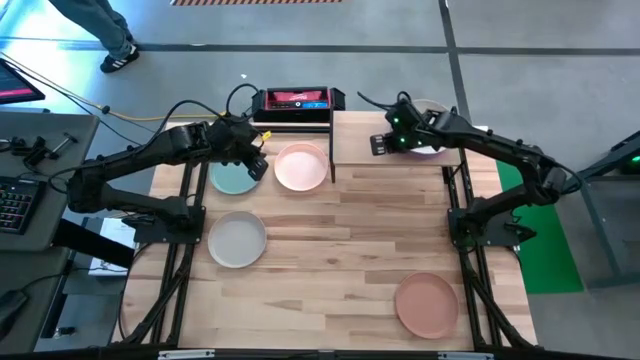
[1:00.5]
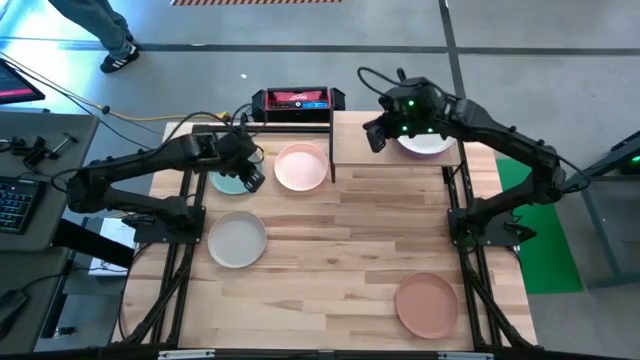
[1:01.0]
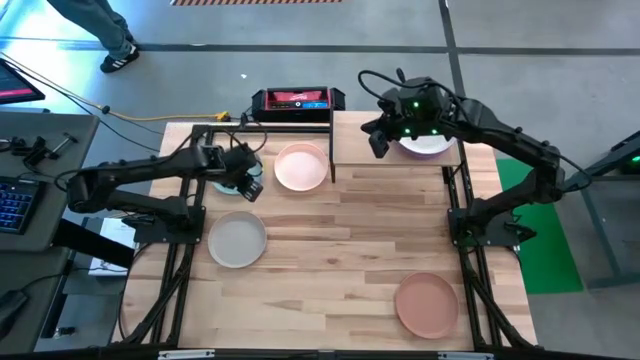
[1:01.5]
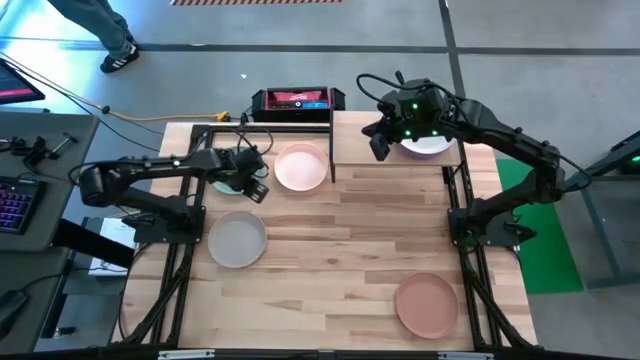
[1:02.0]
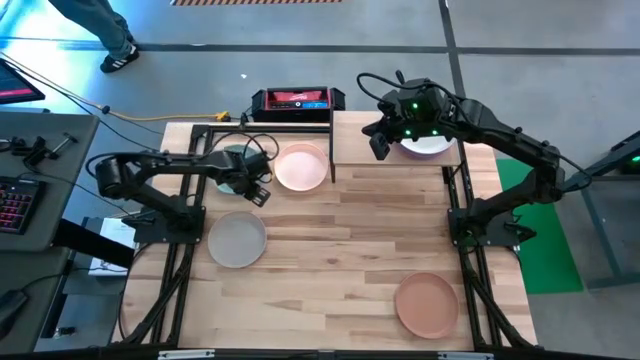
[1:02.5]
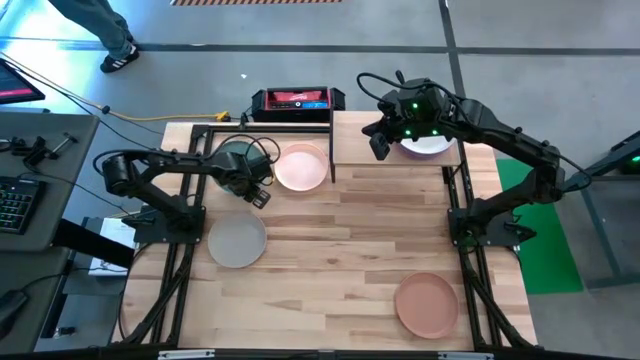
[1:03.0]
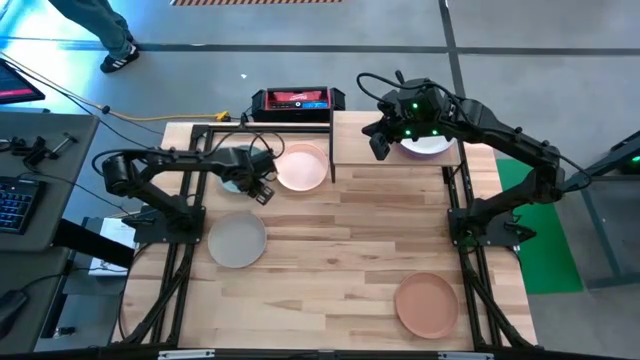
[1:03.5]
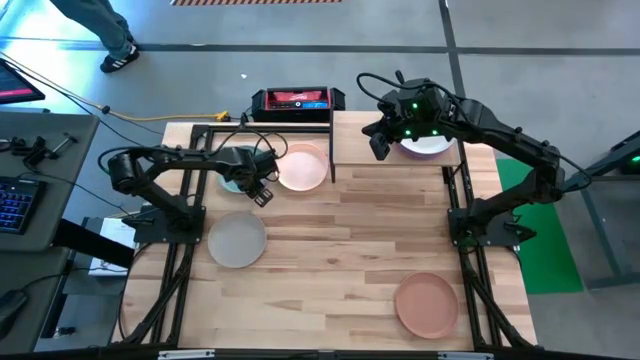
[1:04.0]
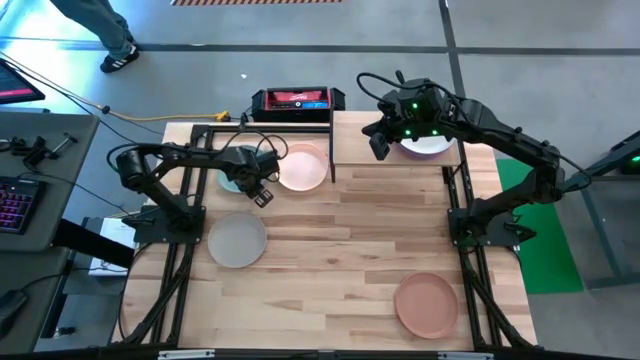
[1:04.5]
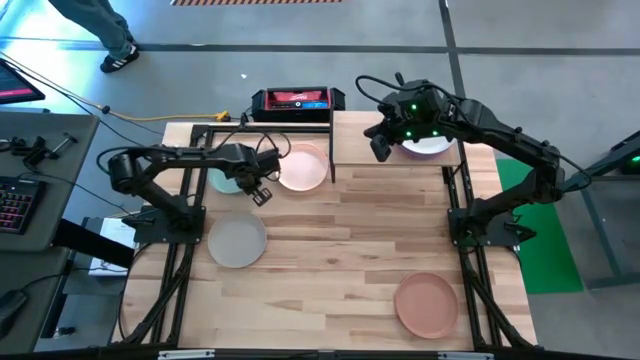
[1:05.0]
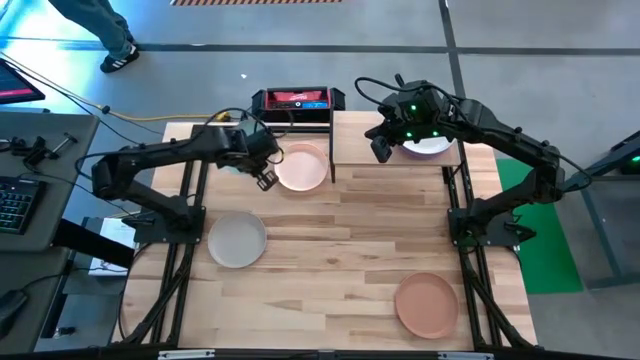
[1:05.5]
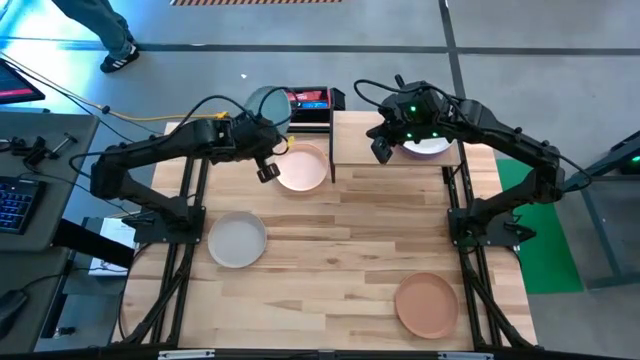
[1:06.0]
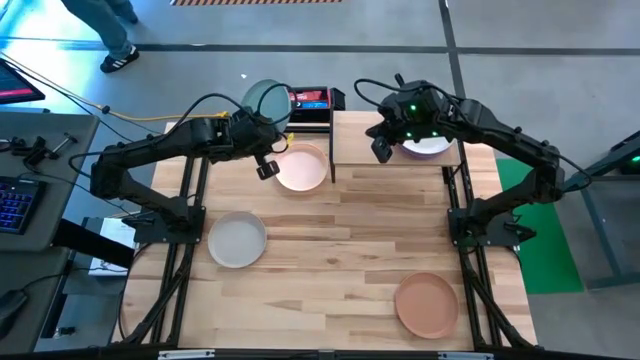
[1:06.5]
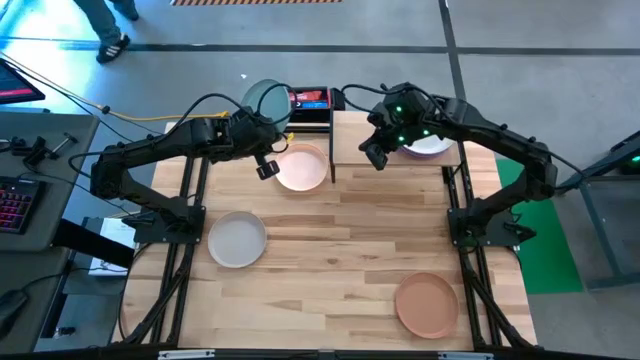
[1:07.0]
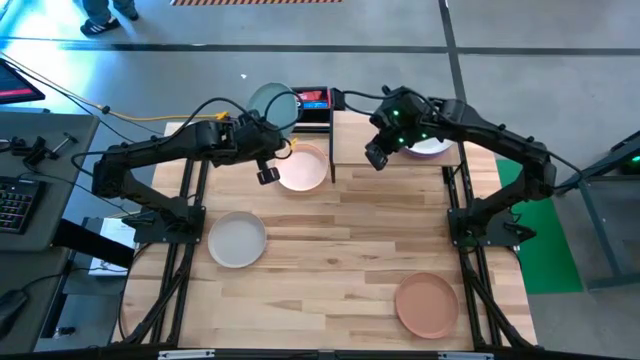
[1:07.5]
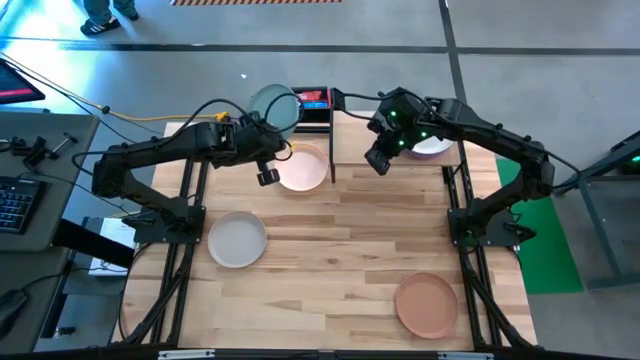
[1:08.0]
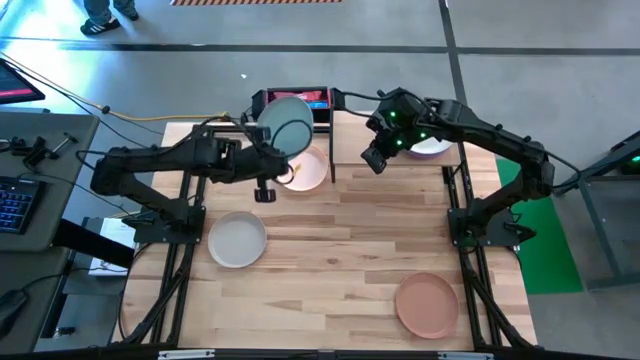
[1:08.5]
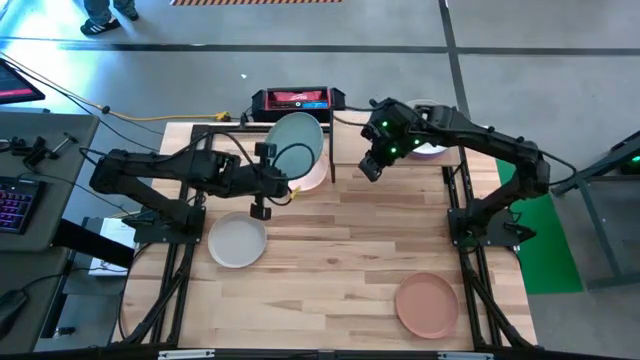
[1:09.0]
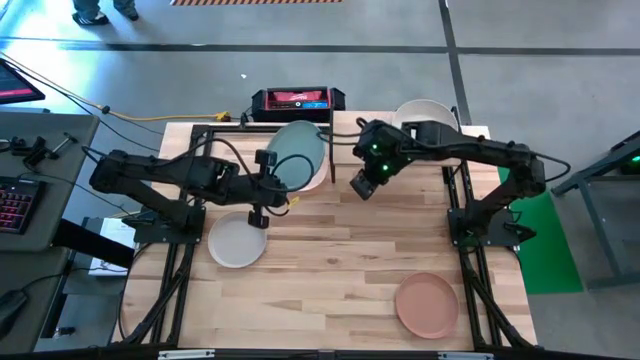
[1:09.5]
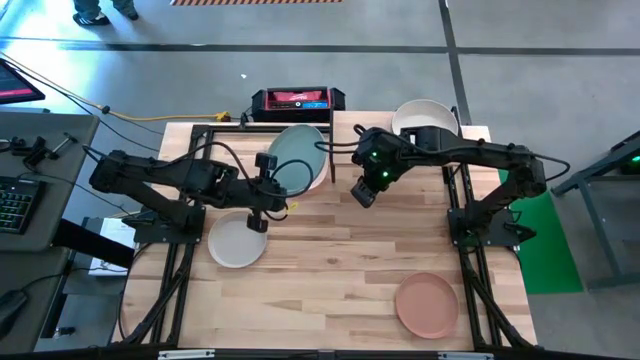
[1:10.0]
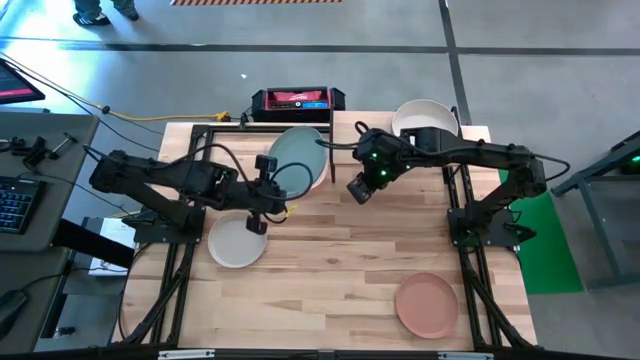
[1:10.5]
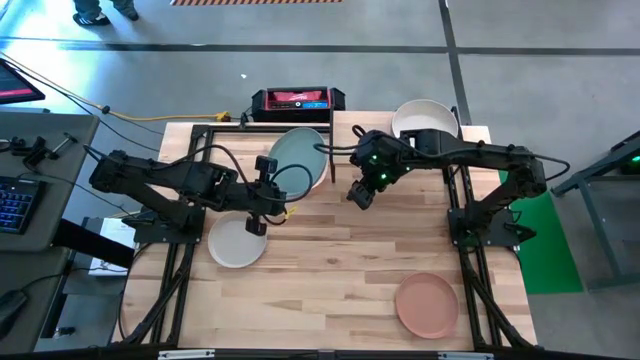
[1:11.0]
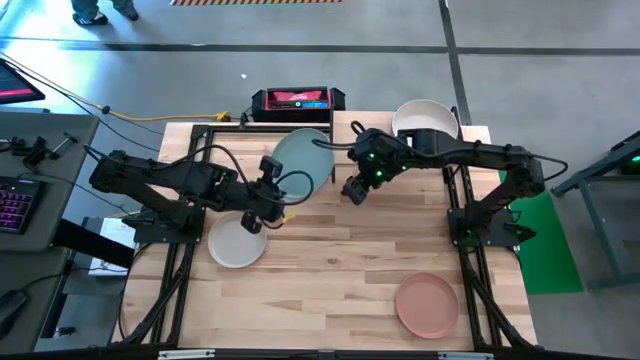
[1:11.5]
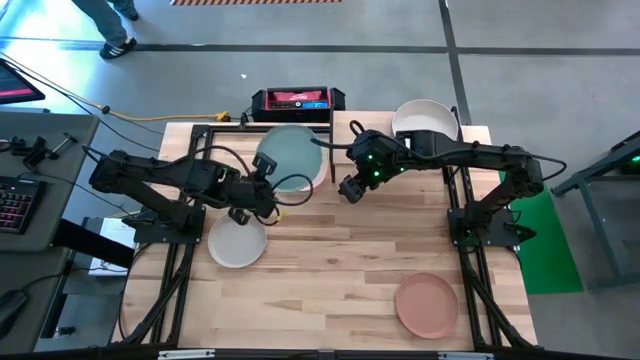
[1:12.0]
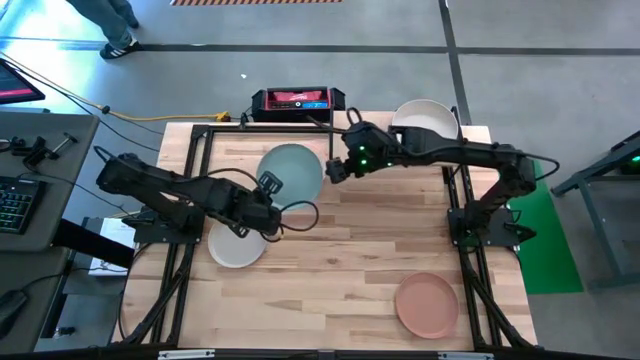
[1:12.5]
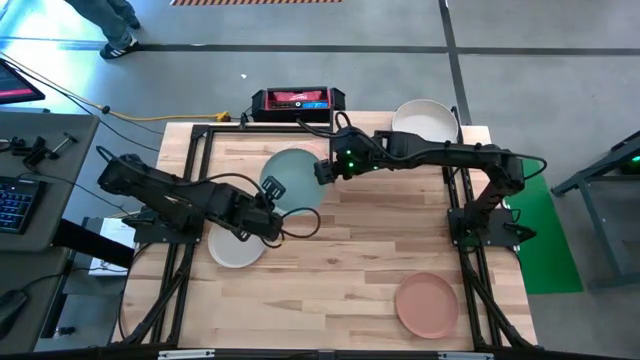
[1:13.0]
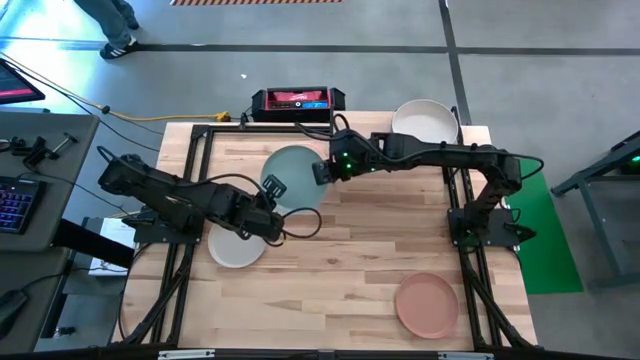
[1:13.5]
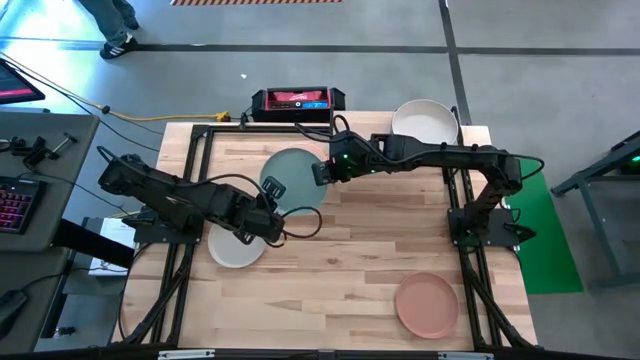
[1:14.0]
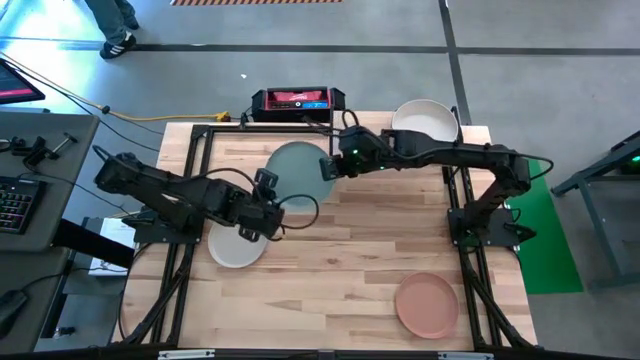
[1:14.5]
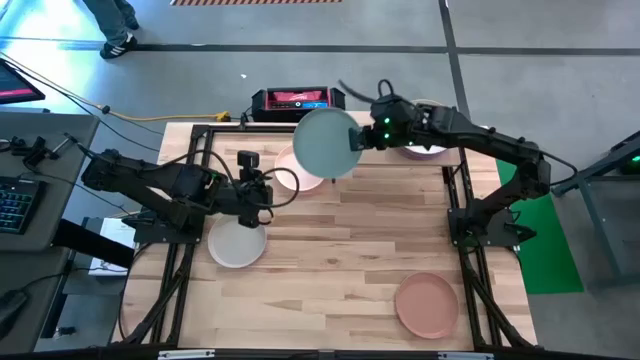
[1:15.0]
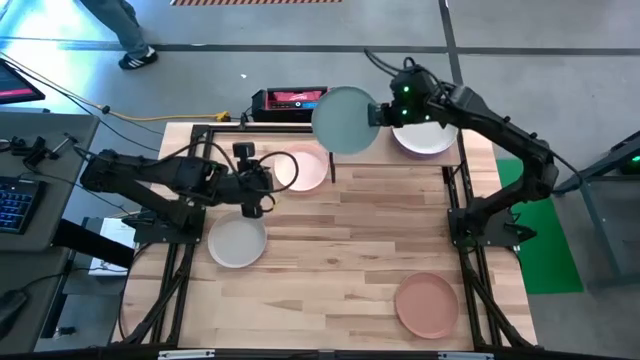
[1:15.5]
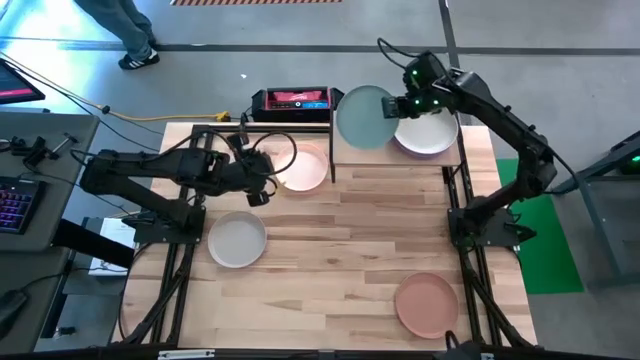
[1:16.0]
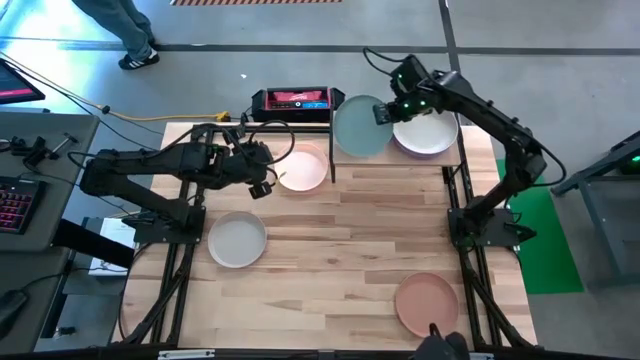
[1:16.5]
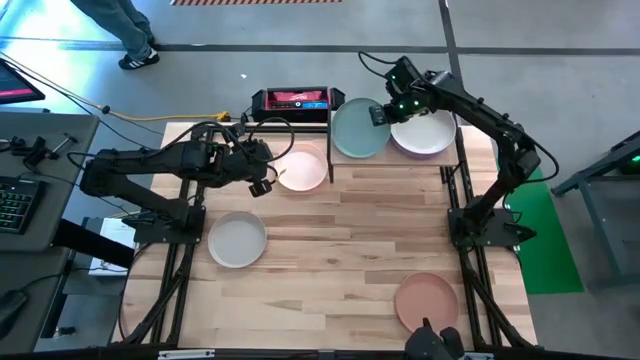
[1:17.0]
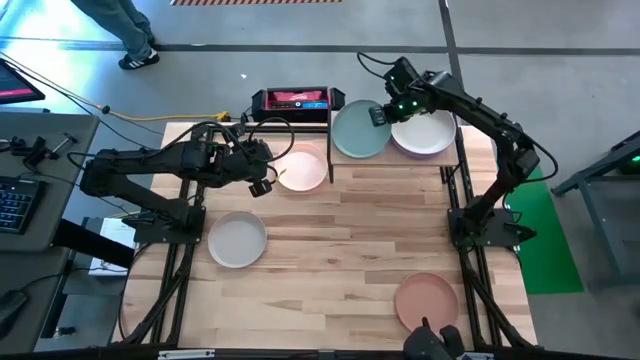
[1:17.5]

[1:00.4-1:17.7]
Task: Place and stack plates onto a shelf
Put the light blue plate on the shelf

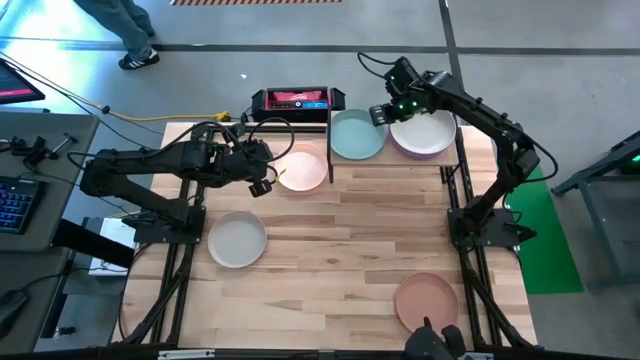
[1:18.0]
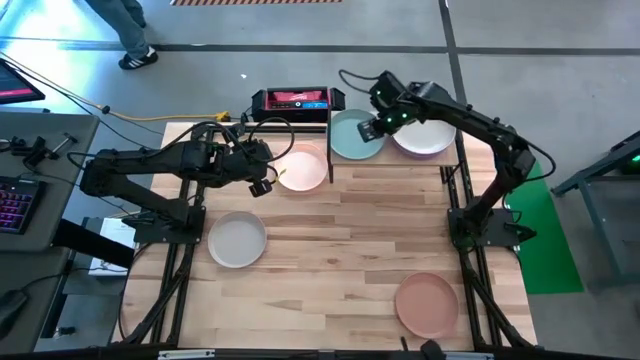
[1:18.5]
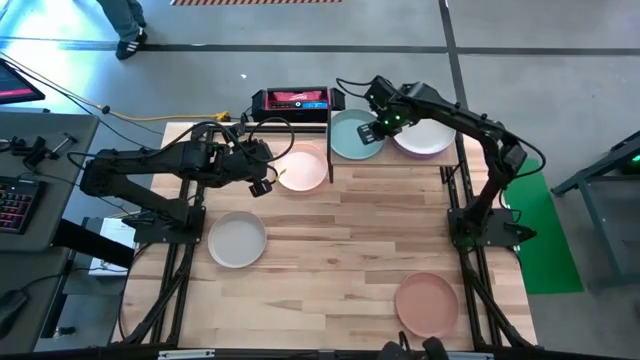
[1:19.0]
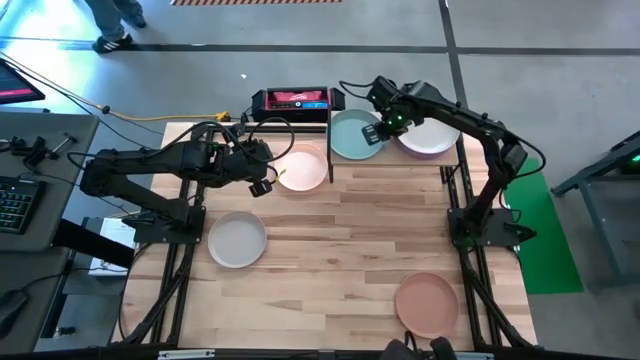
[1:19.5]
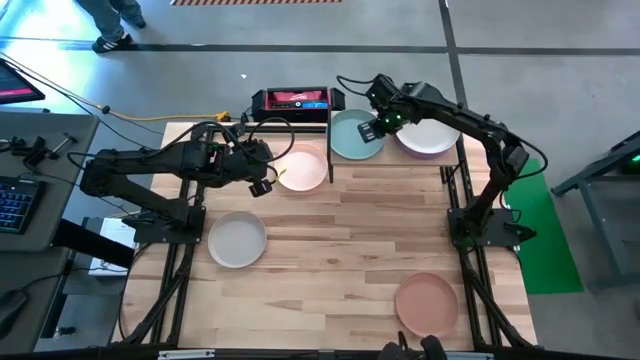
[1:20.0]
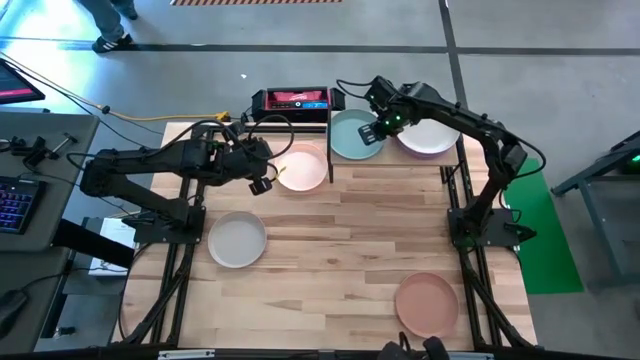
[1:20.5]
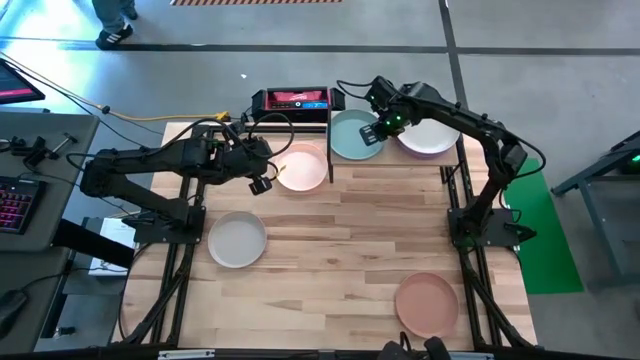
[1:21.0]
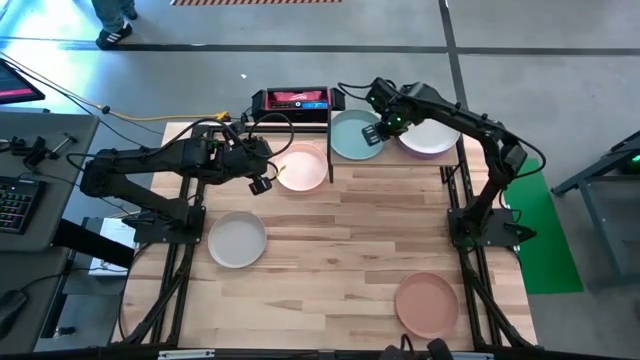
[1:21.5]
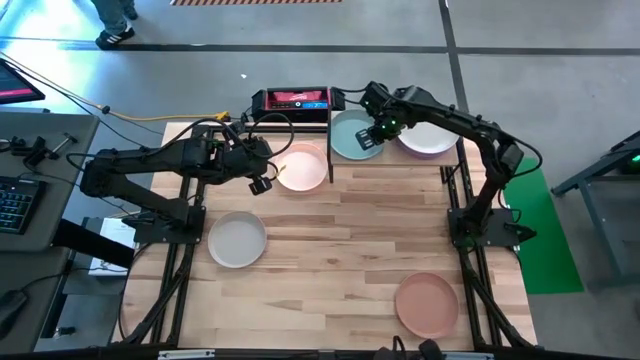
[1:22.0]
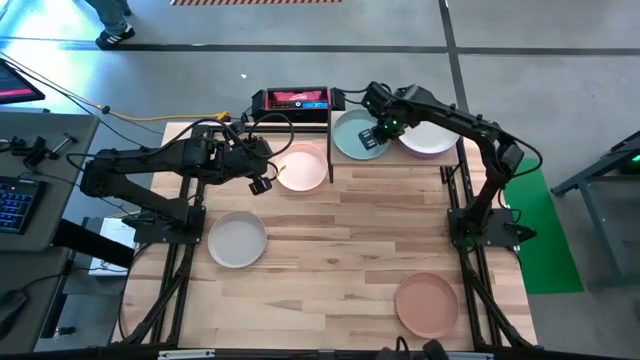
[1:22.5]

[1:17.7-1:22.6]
Adjust the plates on the shelf
